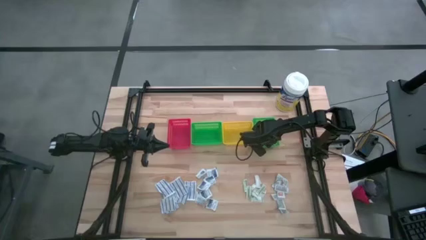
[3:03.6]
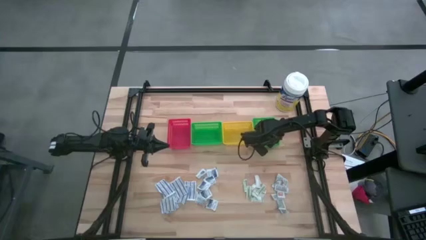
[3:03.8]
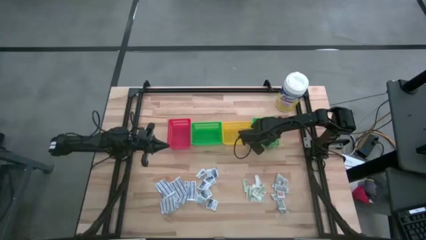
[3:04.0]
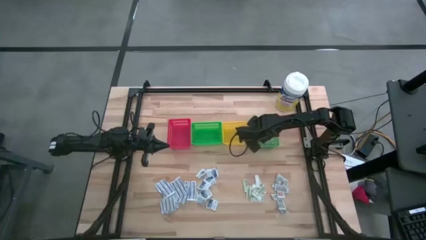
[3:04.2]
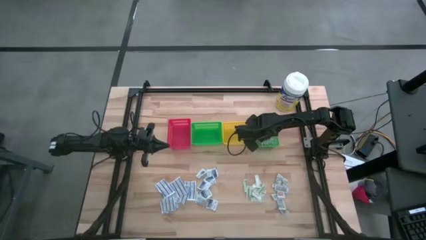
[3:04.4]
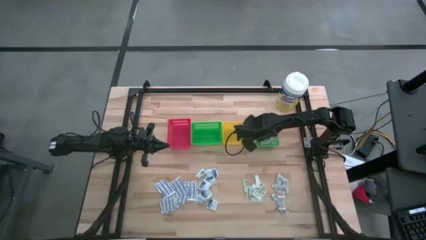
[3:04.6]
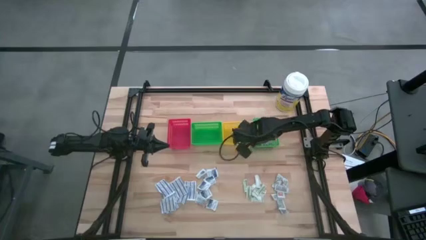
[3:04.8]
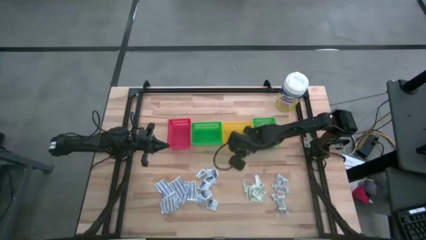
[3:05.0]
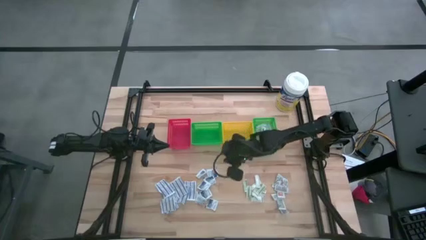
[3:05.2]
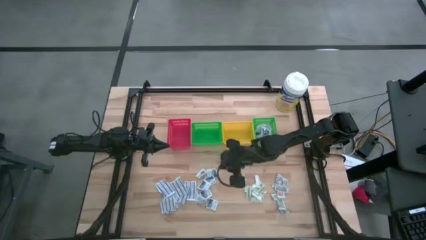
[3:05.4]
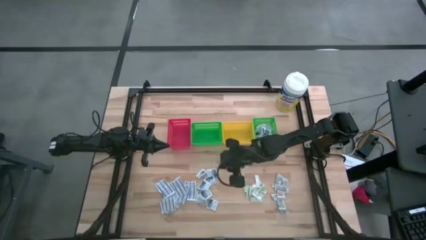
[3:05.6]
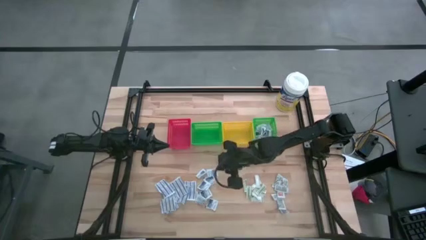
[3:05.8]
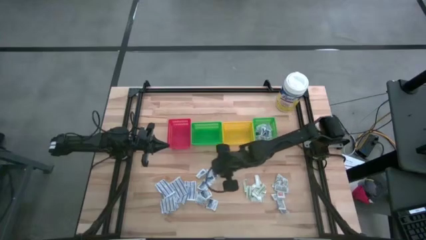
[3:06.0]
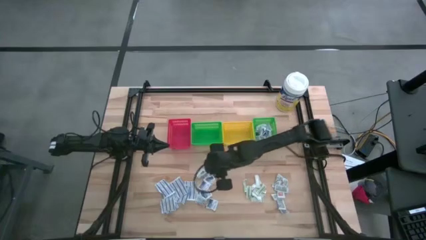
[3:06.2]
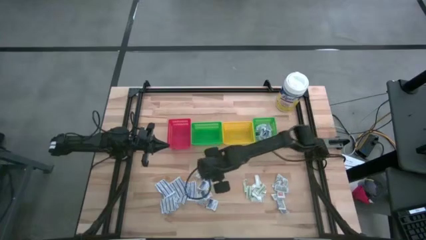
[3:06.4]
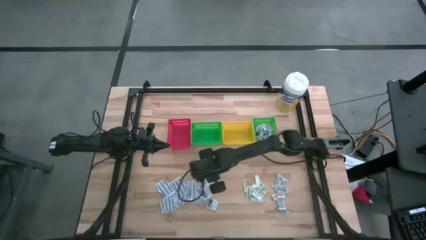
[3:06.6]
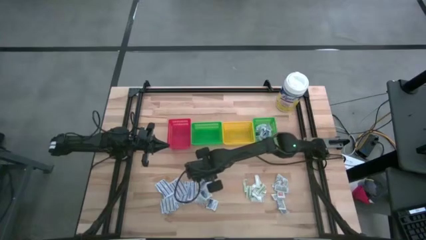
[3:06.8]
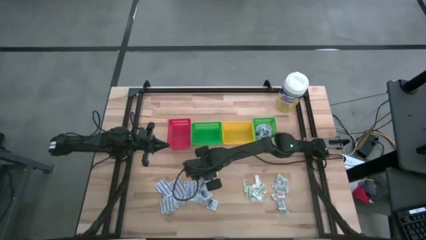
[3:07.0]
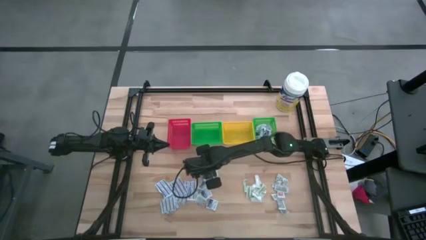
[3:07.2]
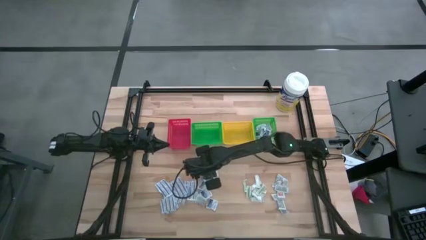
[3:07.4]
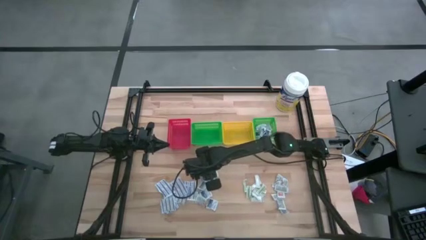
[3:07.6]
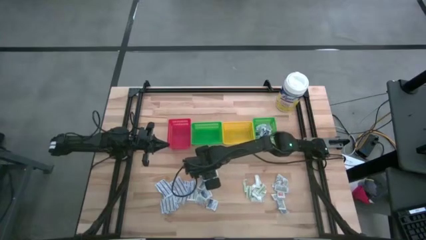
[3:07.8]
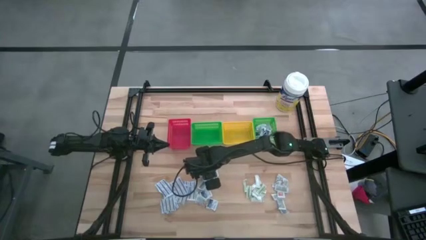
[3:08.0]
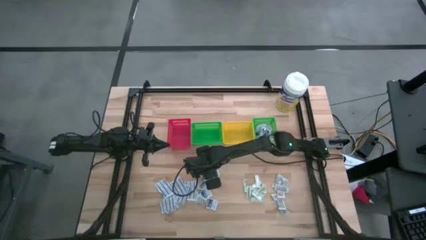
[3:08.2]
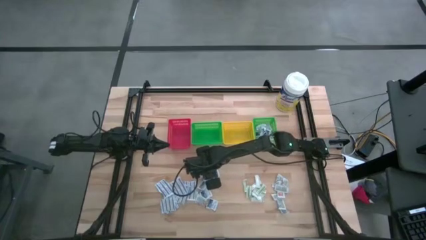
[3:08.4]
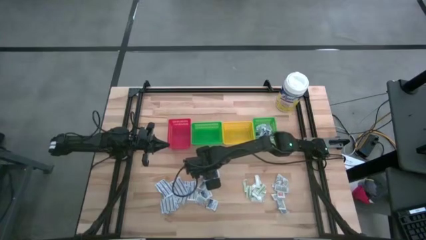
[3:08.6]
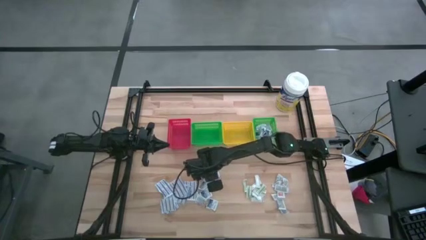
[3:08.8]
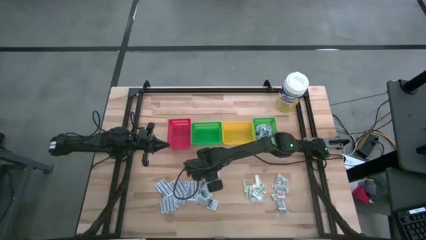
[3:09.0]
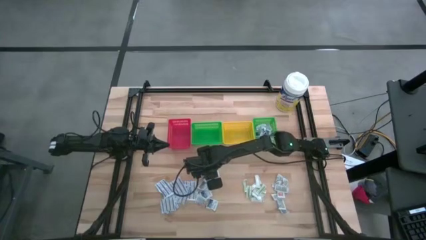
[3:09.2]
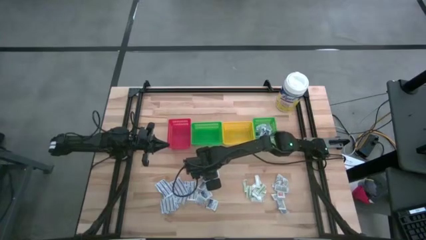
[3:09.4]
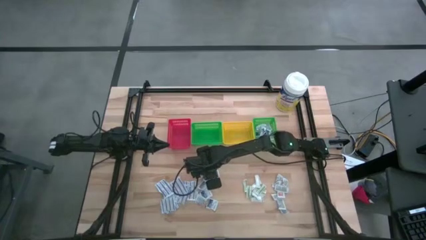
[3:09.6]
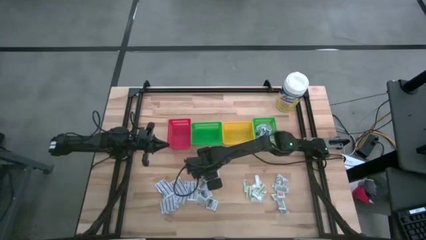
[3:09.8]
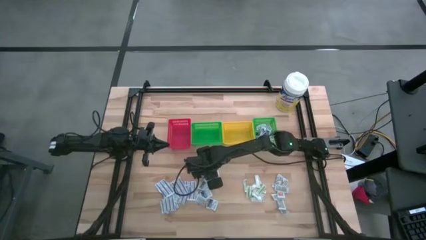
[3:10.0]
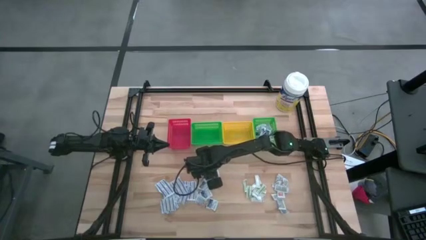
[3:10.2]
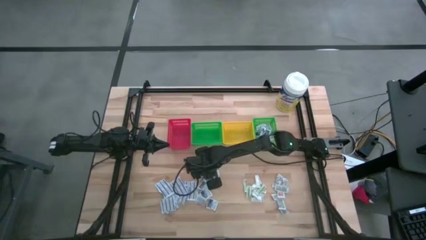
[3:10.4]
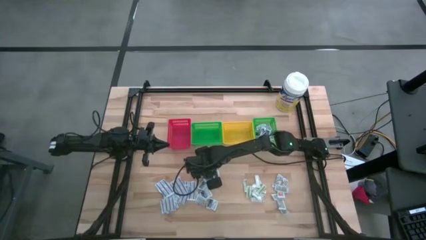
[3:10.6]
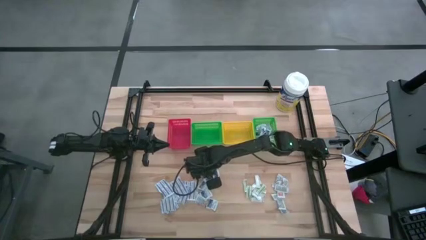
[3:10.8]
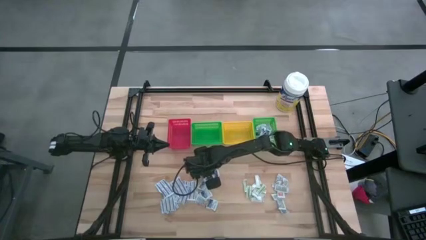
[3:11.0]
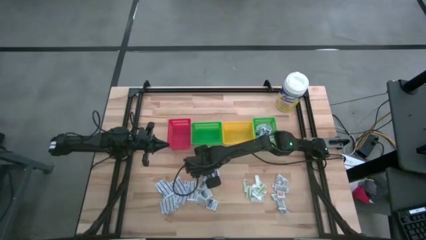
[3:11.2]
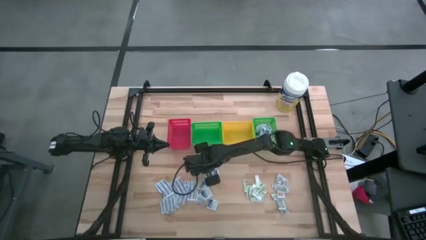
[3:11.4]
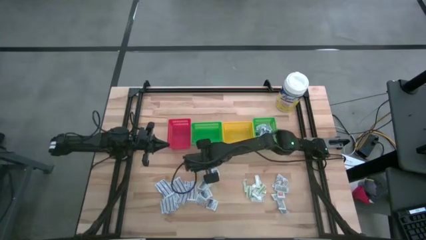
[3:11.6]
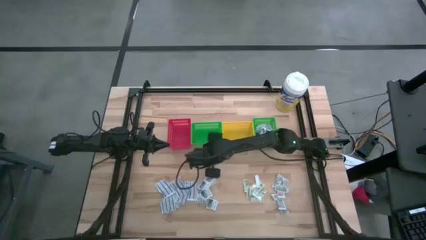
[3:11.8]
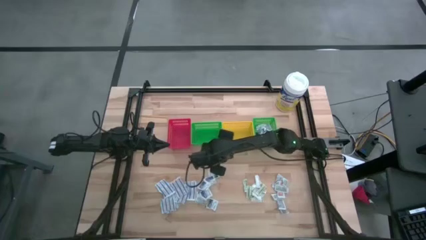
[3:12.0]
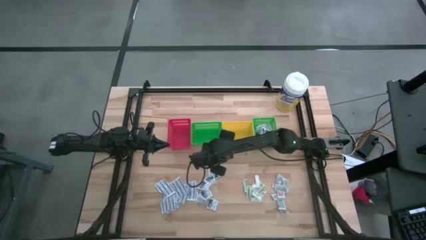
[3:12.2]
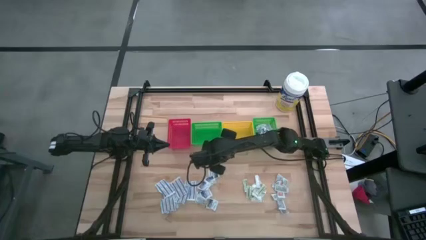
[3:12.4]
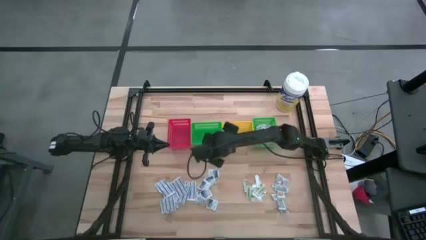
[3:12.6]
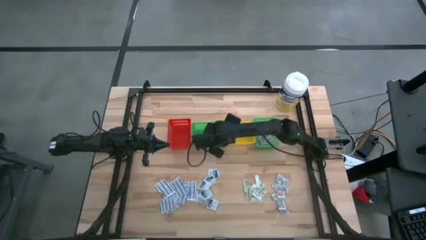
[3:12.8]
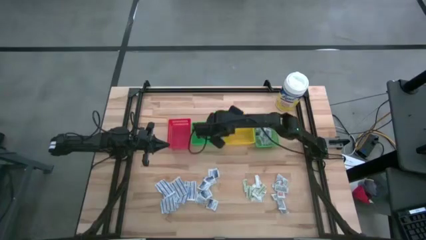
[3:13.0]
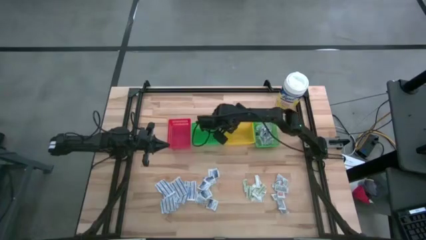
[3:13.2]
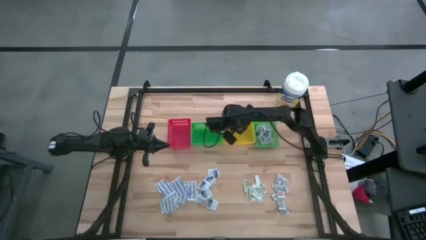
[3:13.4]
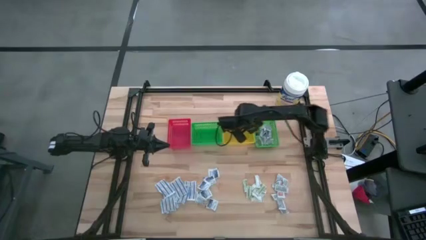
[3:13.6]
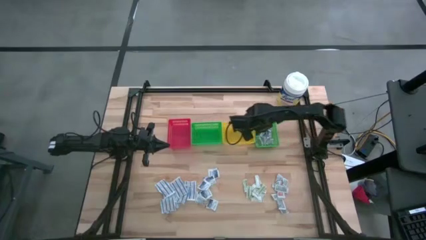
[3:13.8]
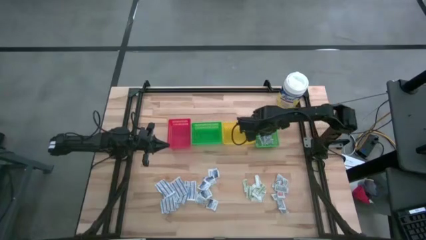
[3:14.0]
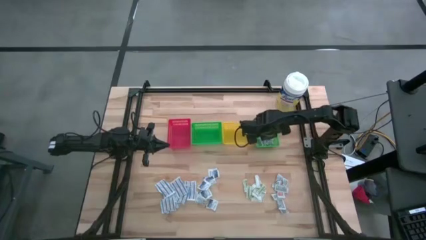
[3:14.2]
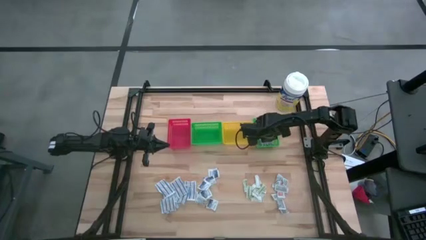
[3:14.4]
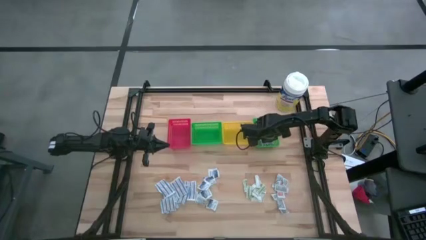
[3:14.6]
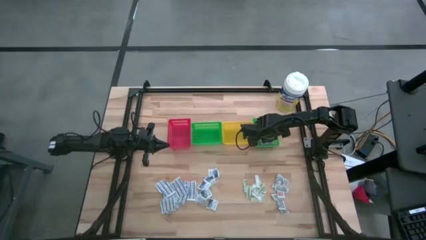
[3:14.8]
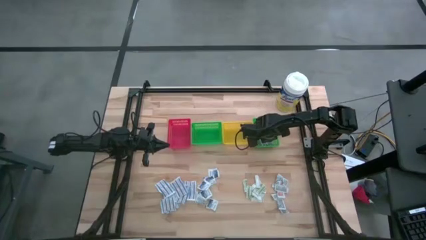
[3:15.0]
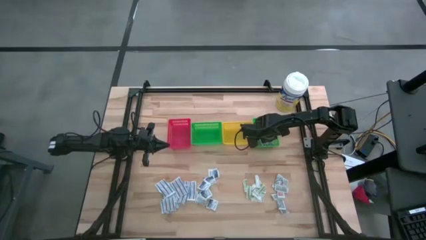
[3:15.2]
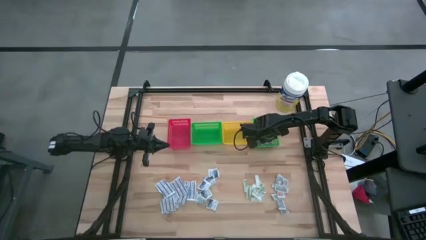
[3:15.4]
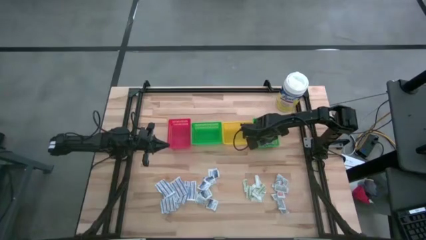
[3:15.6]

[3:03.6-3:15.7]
Task: Pick & Place First Aid Supplies
Put the blue alcohol pad into the right green bin

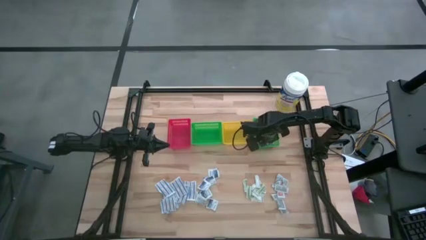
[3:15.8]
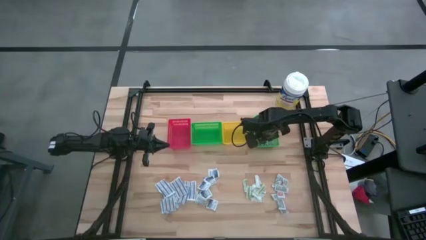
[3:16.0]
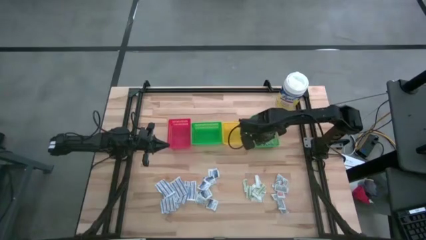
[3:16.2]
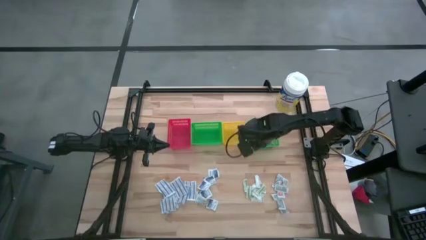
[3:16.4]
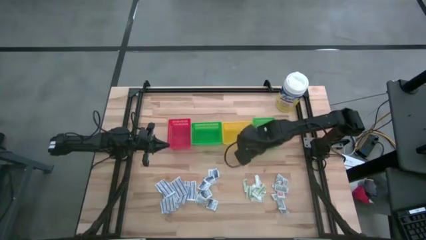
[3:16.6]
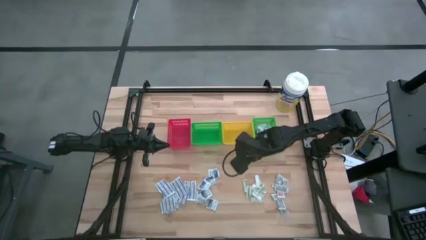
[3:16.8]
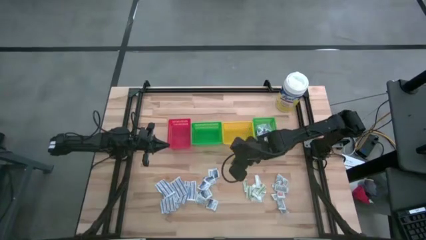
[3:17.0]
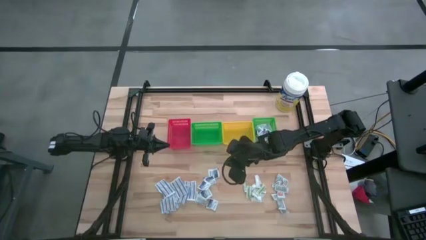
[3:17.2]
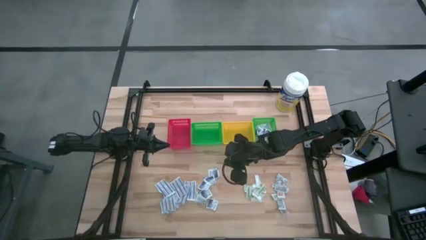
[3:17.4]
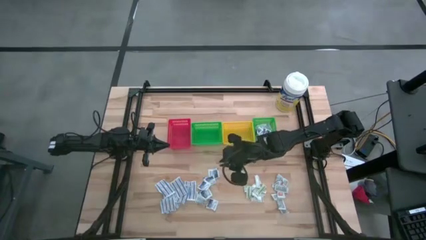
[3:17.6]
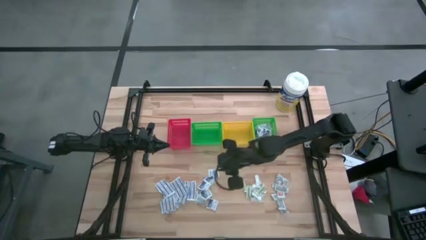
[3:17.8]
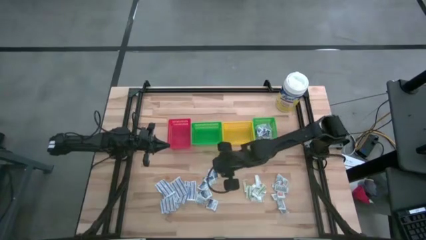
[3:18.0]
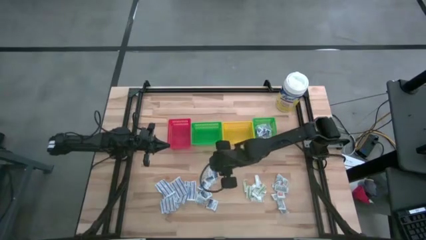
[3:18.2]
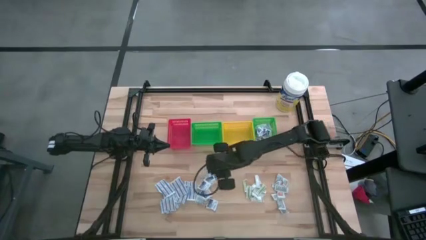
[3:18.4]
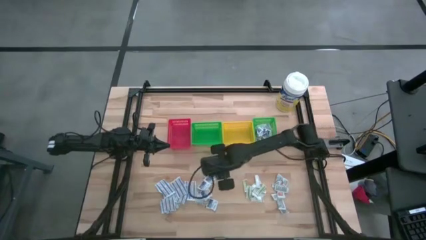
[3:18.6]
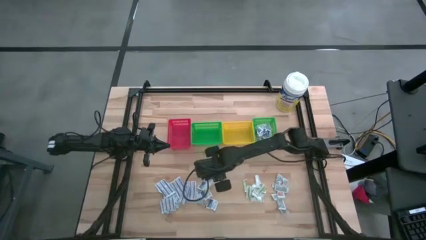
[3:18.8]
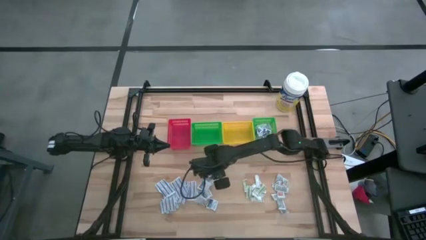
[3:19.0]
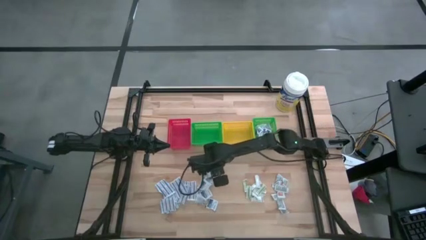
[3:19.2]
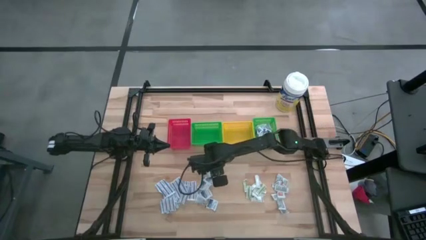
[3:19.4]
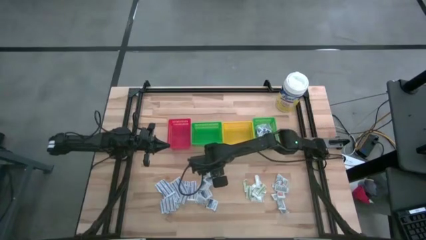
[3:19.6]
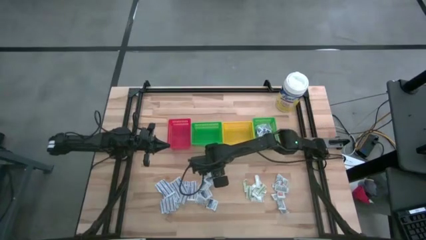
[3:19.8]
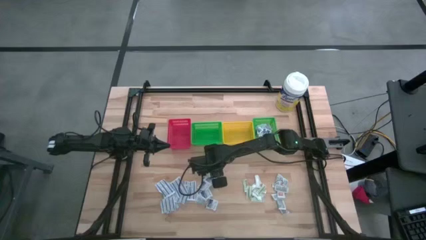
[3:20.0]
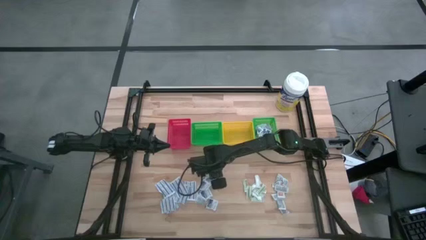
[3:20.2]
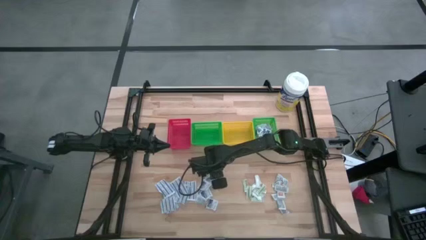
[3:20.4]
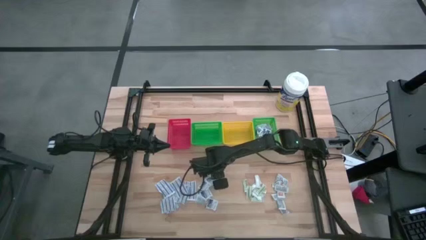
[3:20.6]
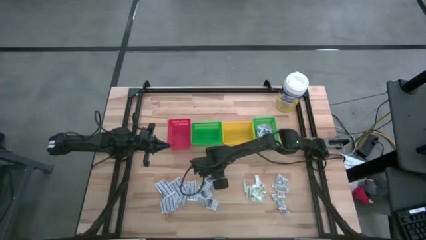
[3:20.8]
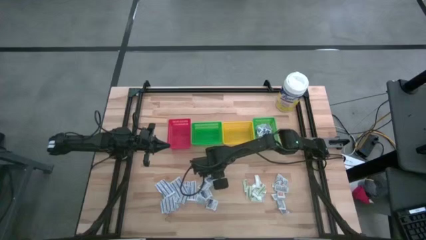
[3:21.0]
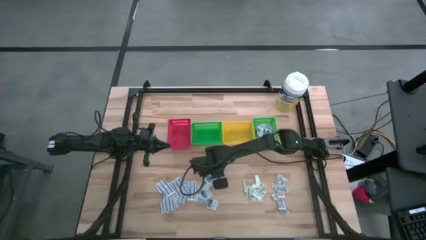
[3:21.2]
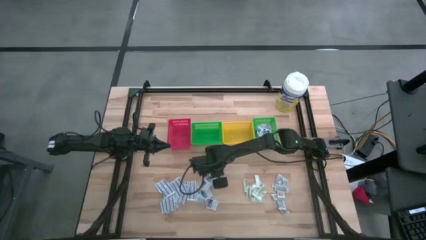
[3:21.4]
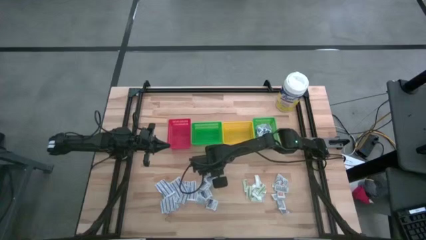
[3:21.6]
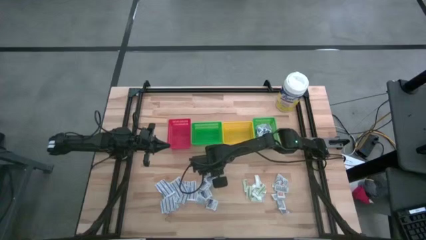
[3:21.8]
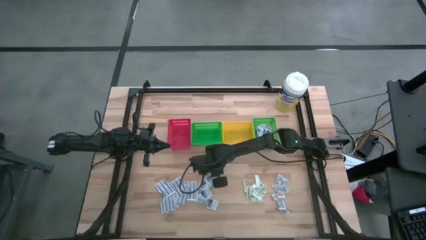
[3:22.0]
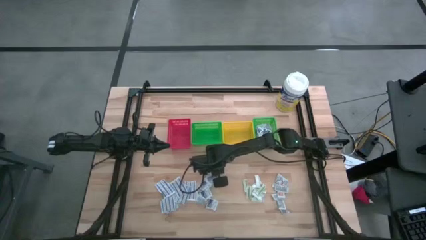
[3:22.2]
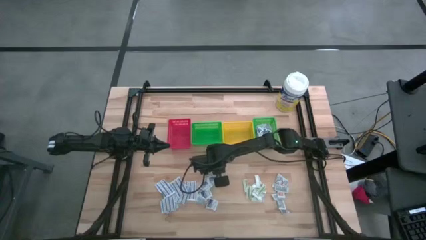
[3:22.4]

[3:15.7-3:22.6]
Put the blue alcohol pad into the right green bin
